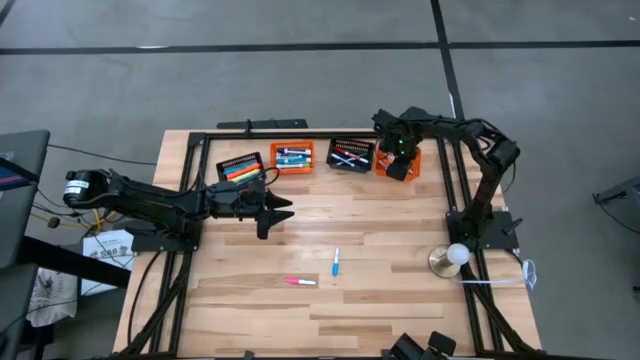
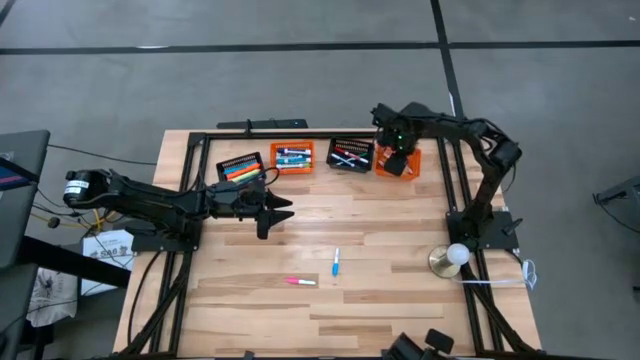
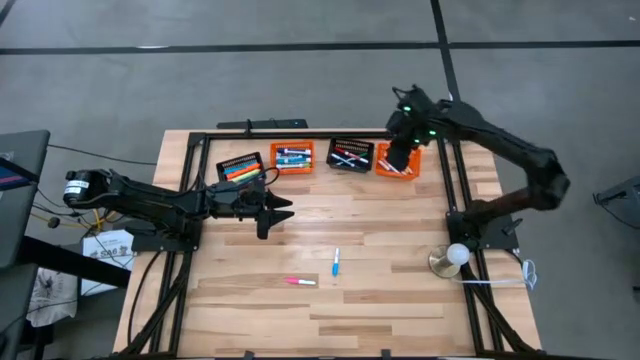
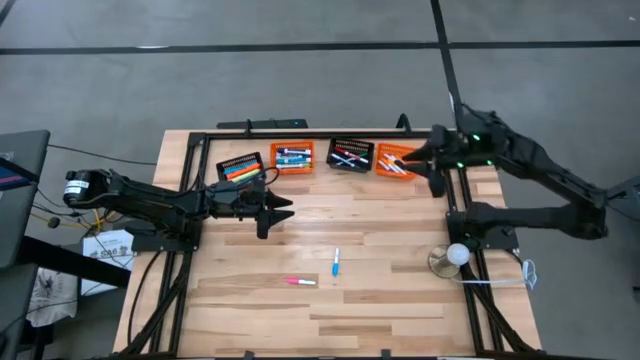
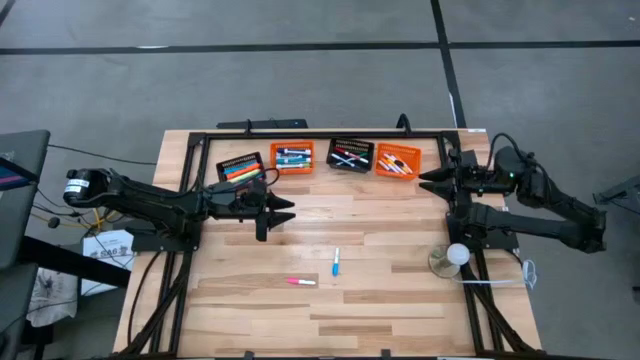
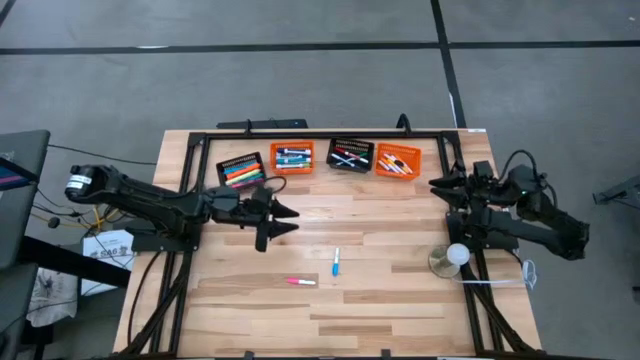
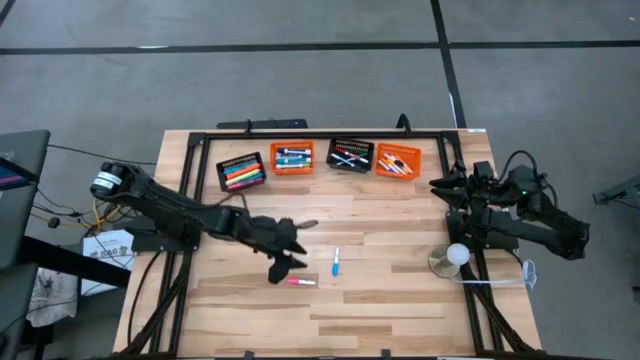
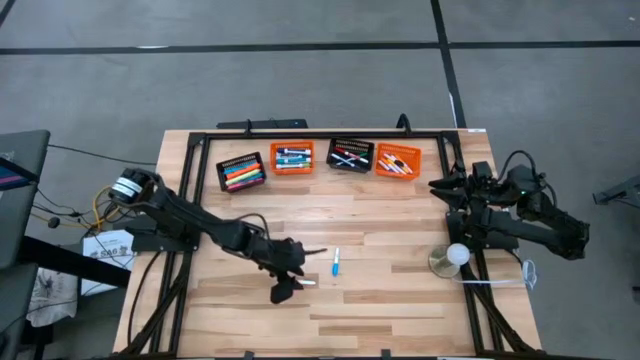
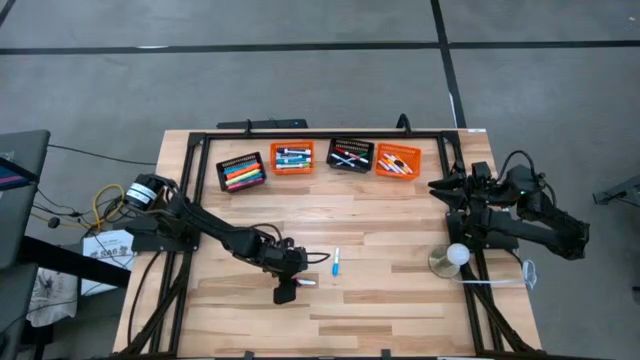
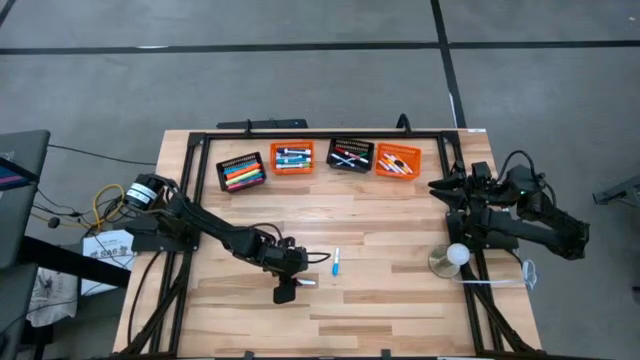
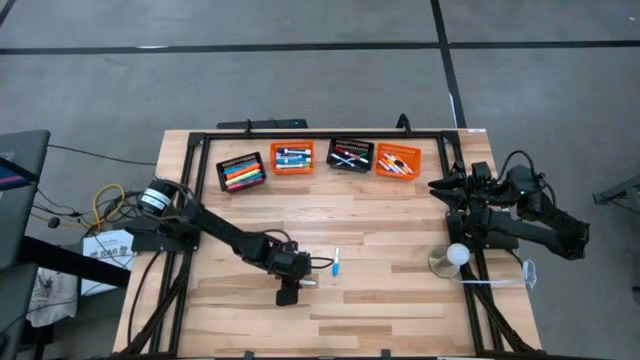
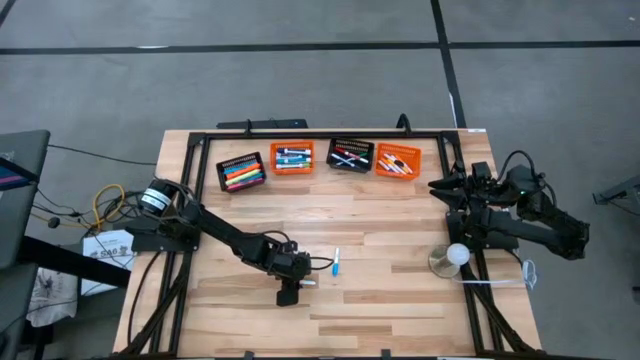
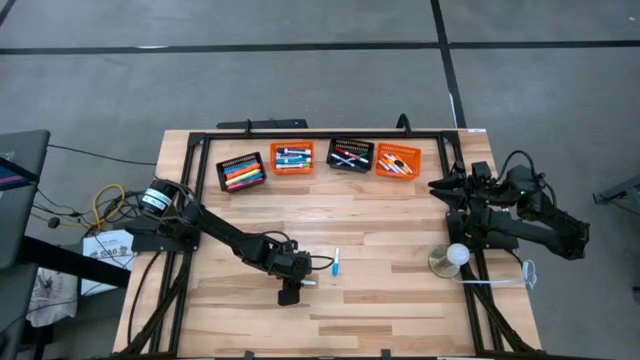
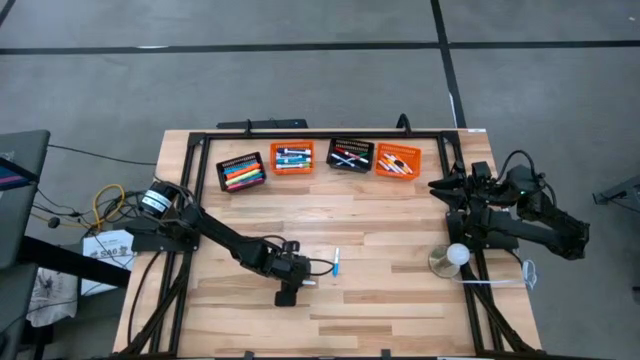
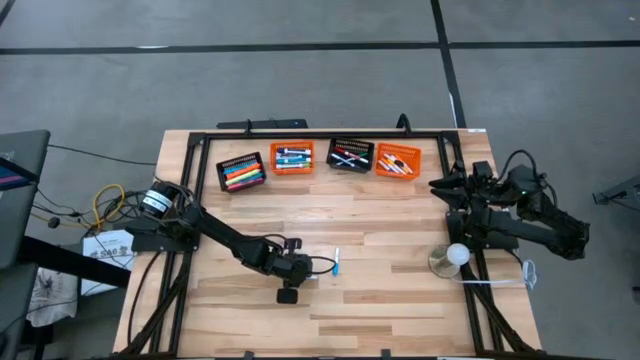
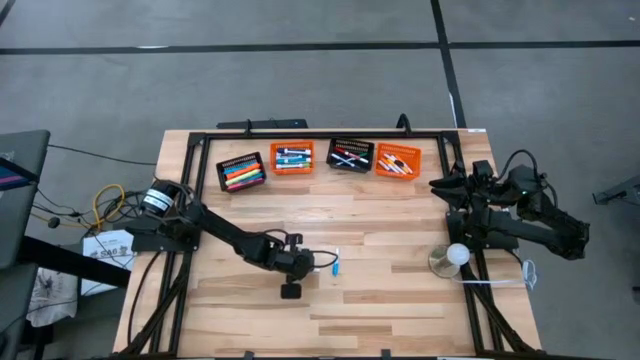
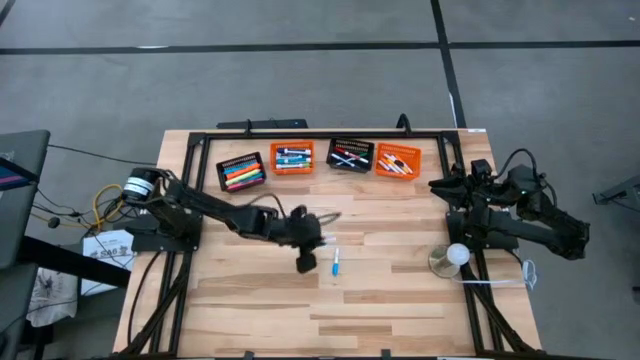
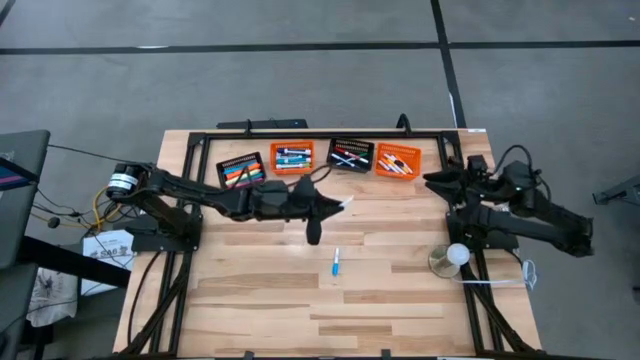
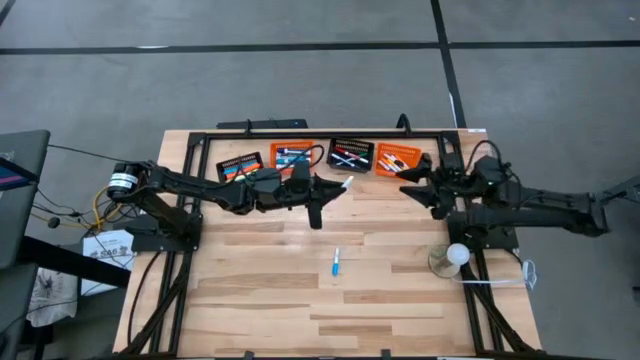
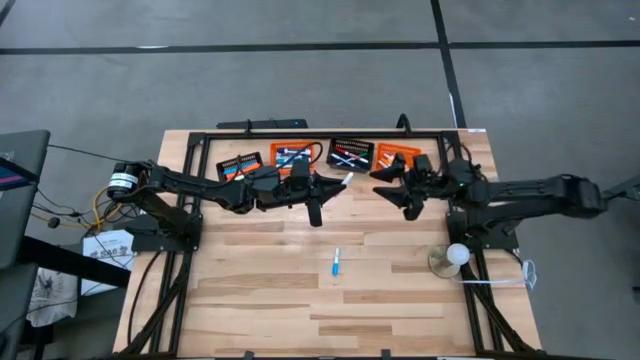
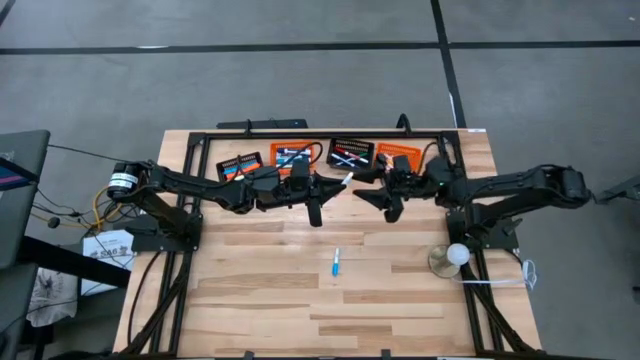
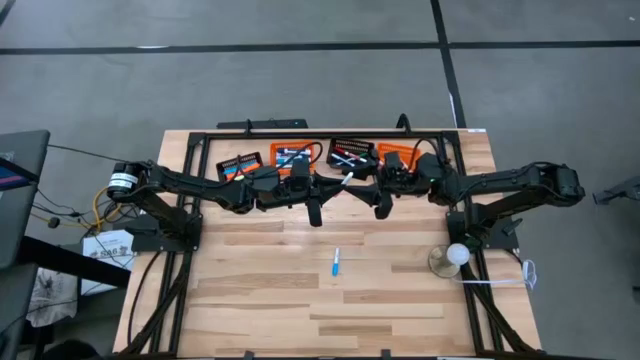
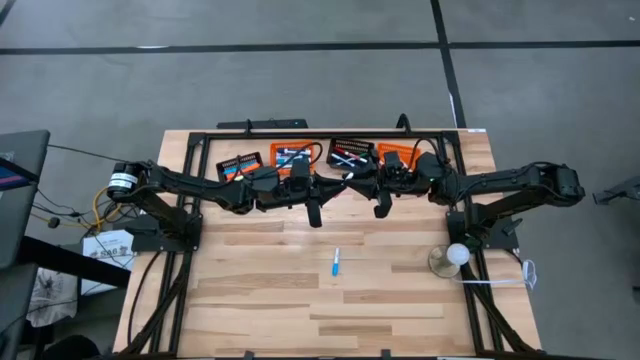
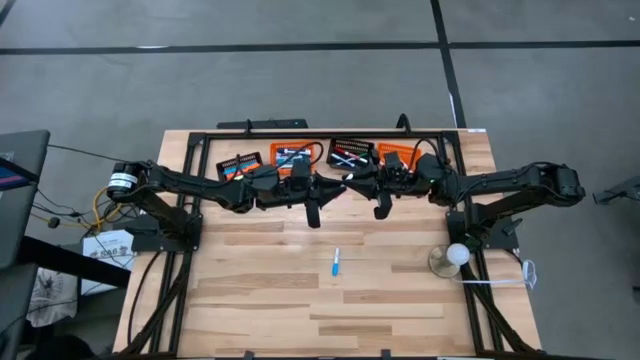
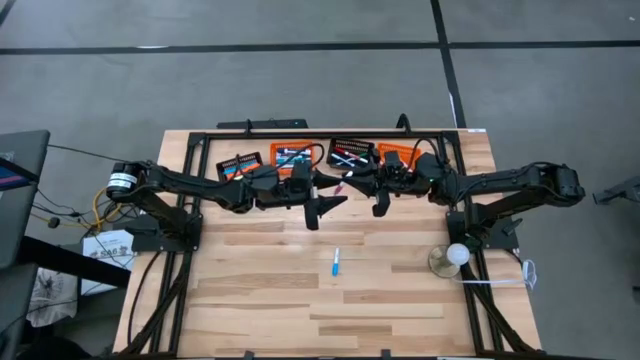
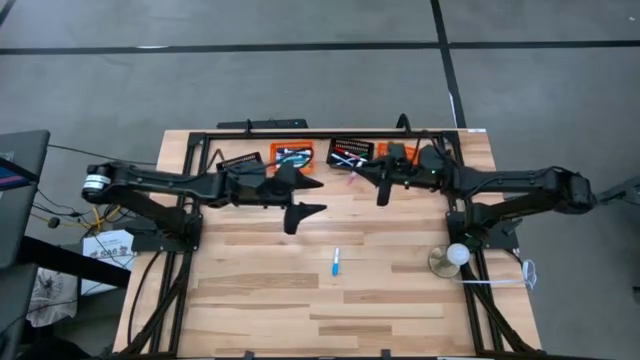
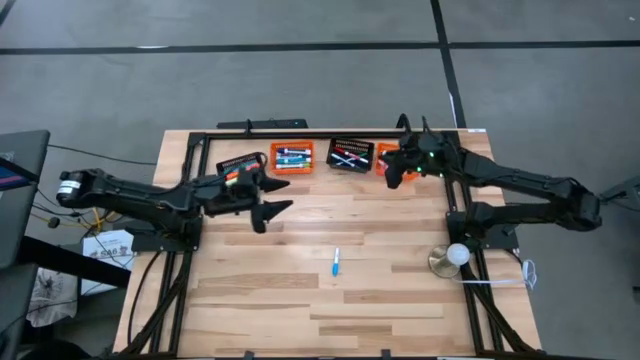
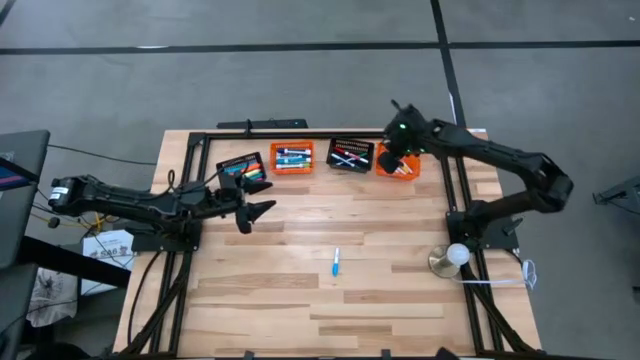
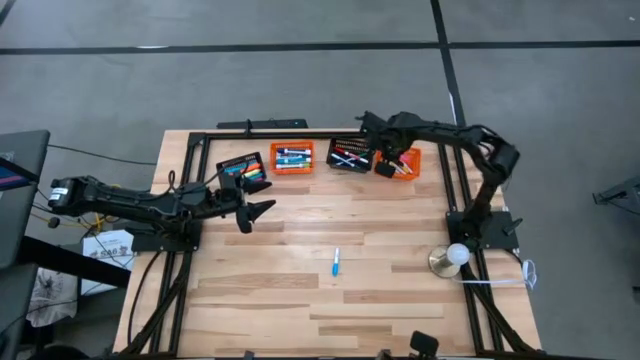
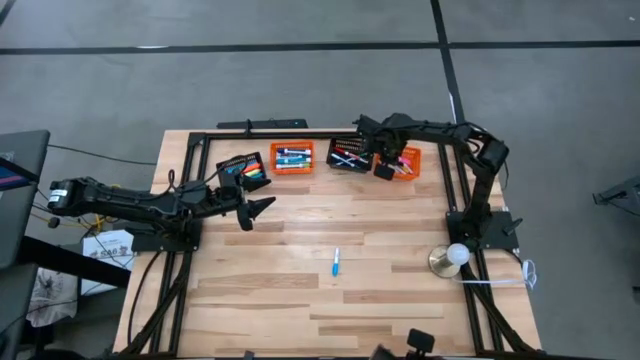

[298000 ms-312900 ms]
Task: Pick & Place Markers
Put the small pink highlighter pen into the right orange bin

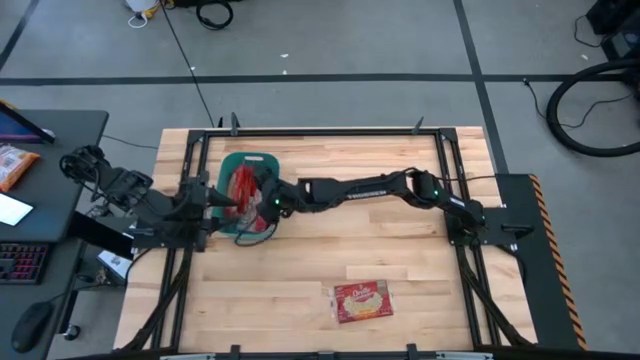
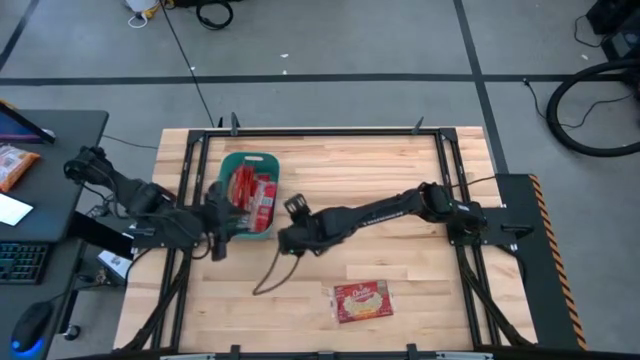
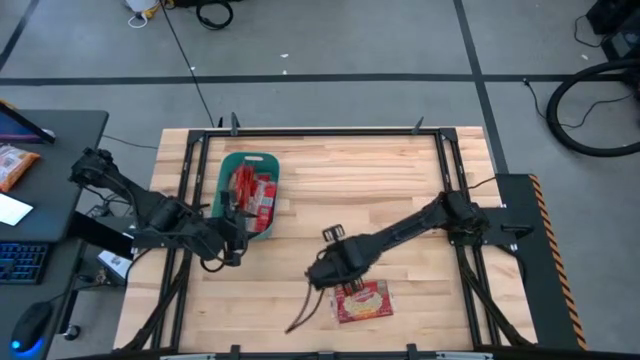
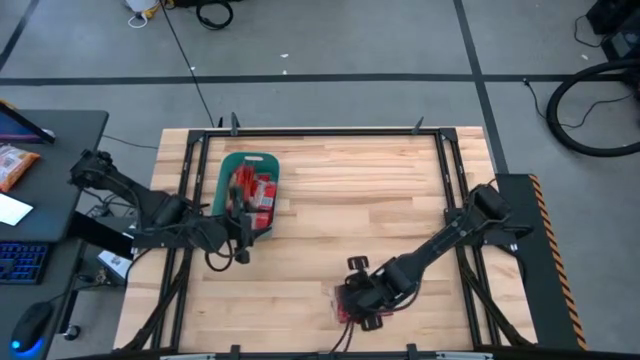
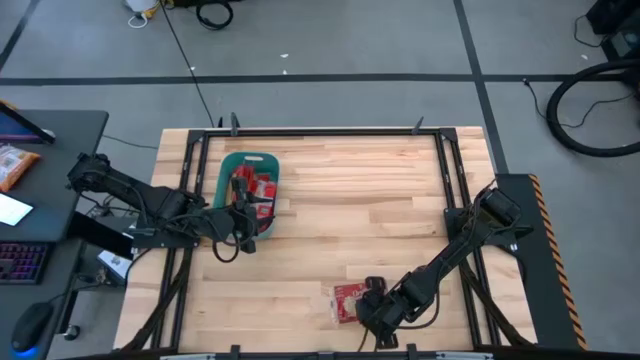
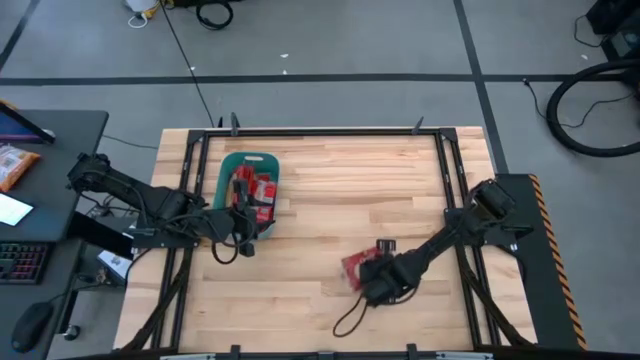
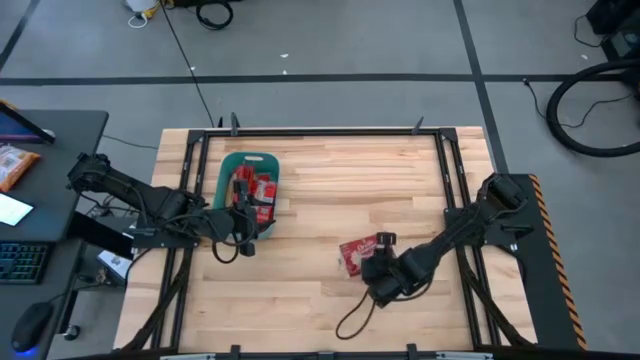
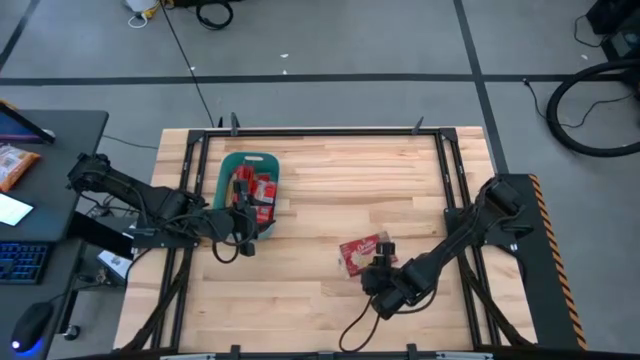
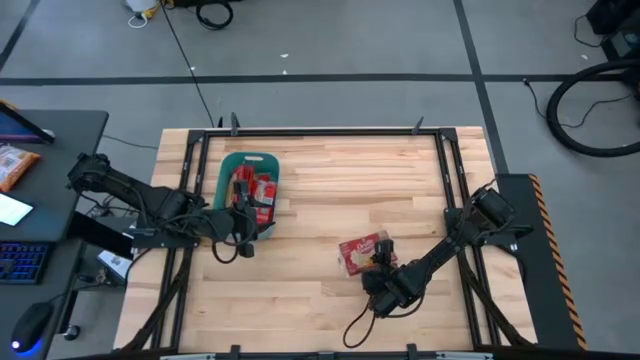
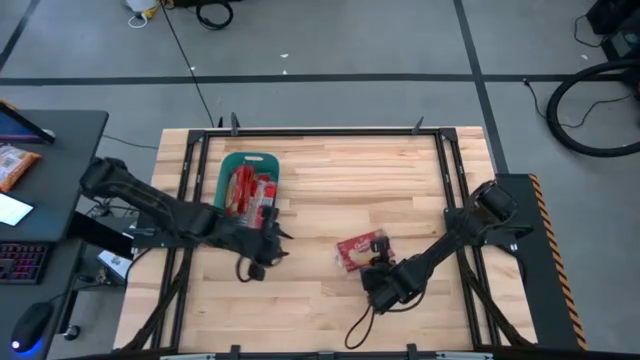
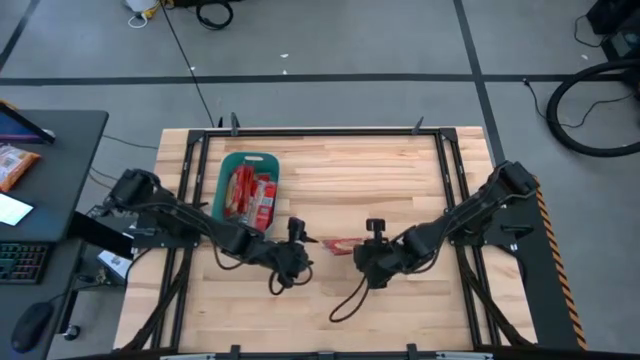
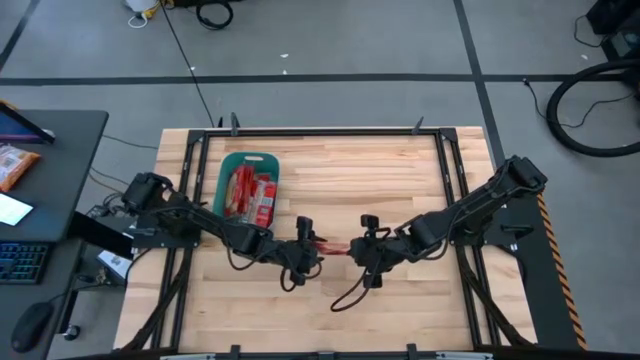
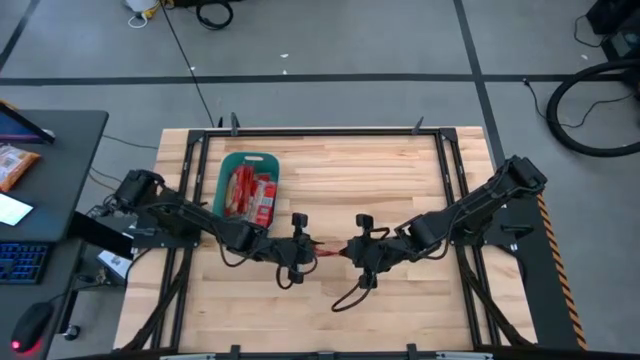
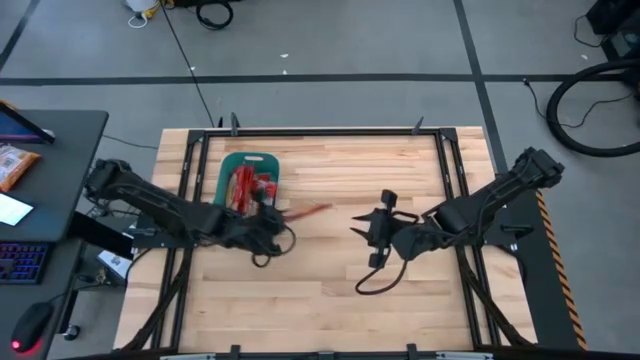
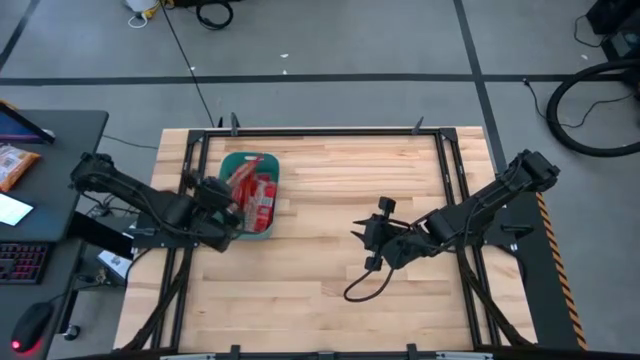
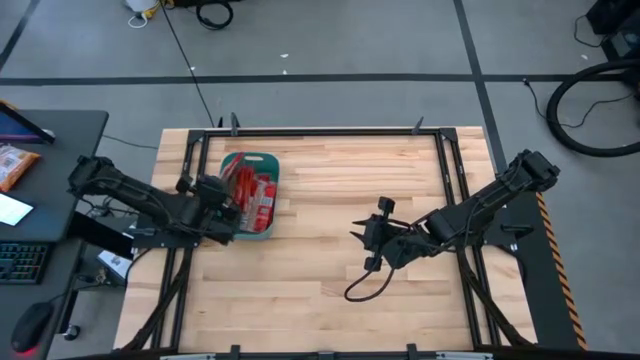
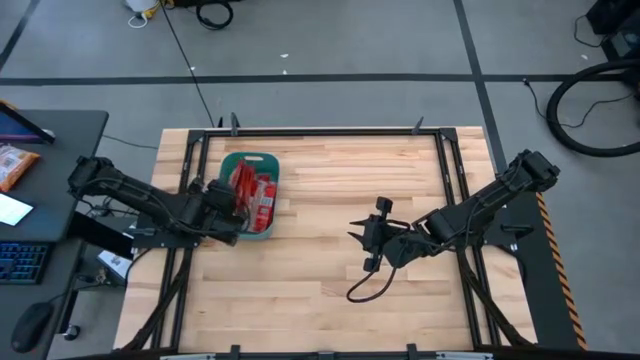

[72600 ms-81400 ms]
Task: Sort popcorn bags into baskets
Put the red popcorn bag into the green bin
